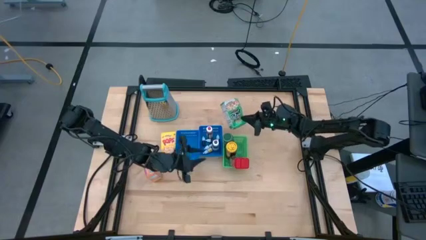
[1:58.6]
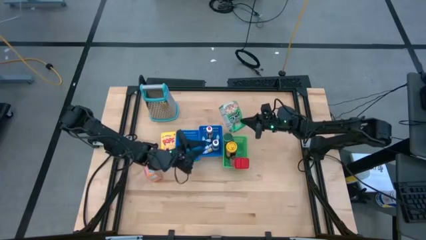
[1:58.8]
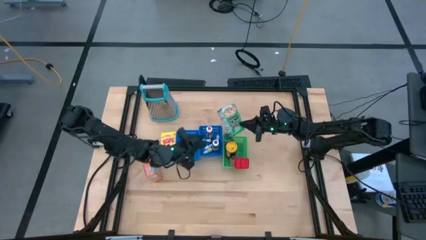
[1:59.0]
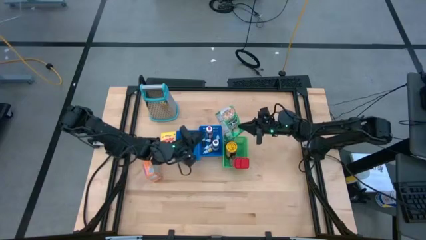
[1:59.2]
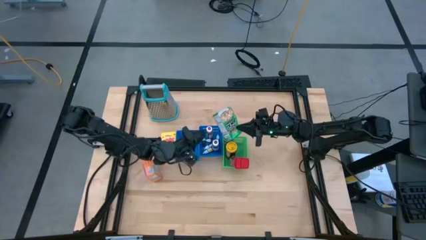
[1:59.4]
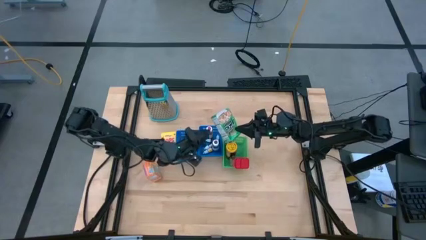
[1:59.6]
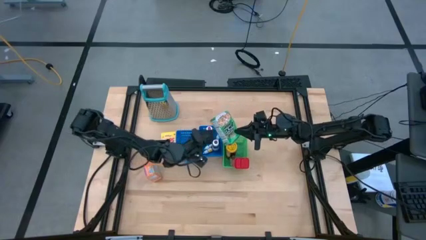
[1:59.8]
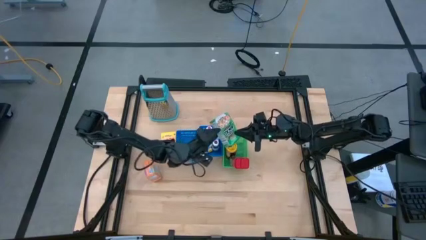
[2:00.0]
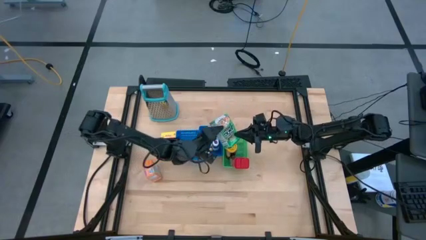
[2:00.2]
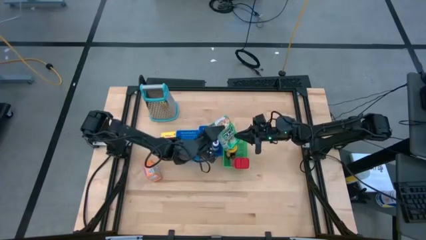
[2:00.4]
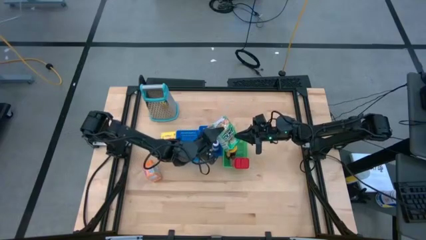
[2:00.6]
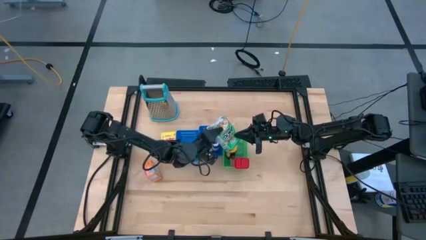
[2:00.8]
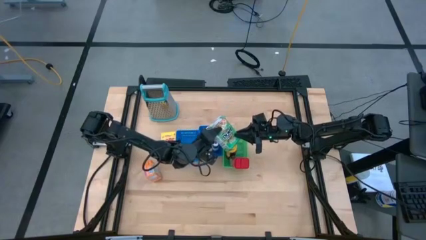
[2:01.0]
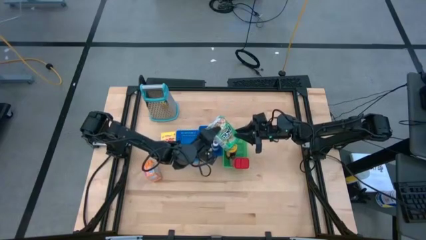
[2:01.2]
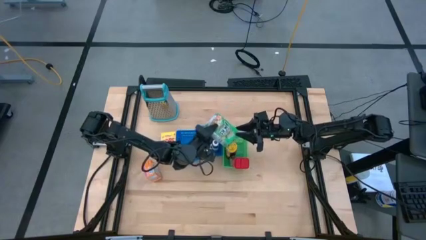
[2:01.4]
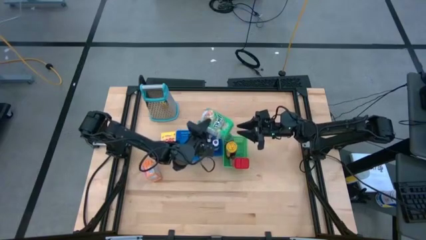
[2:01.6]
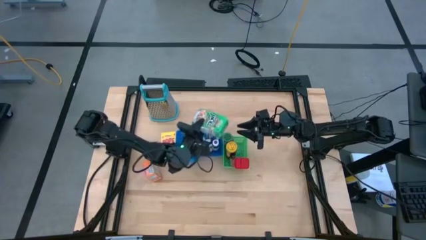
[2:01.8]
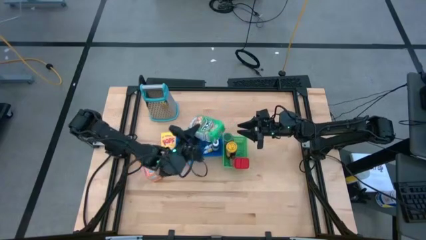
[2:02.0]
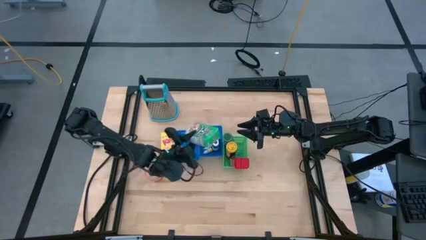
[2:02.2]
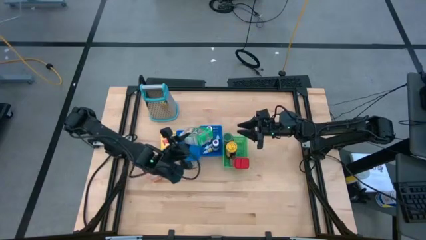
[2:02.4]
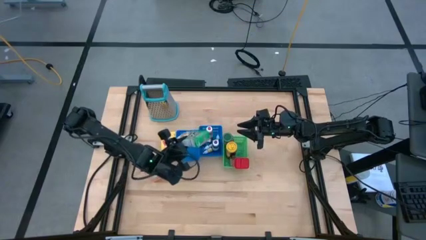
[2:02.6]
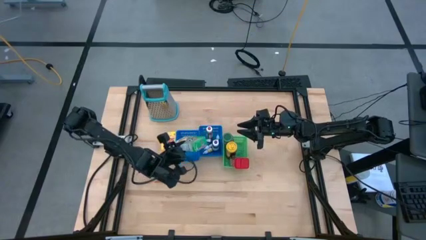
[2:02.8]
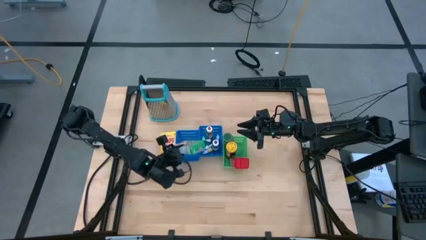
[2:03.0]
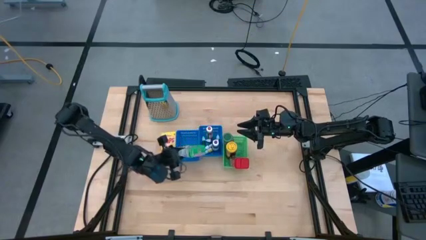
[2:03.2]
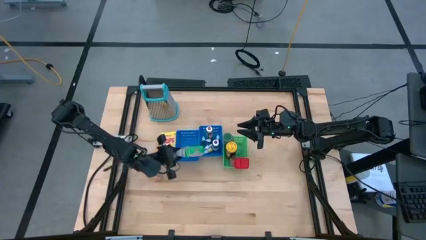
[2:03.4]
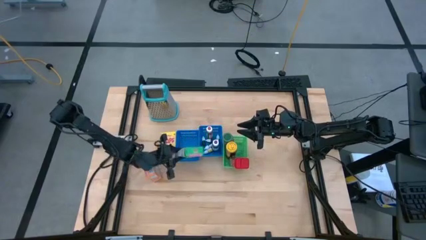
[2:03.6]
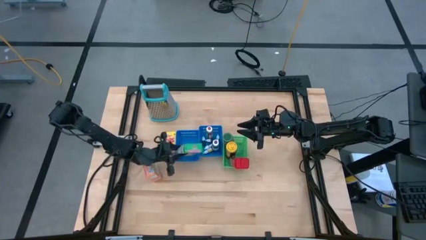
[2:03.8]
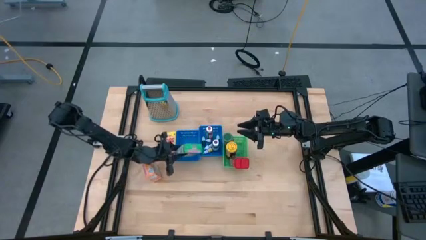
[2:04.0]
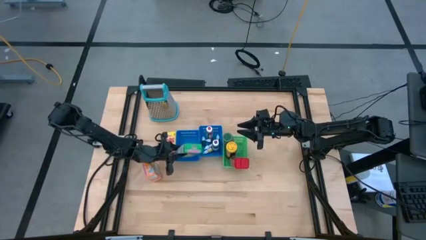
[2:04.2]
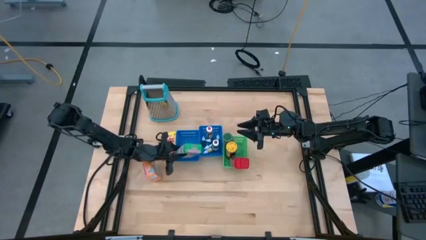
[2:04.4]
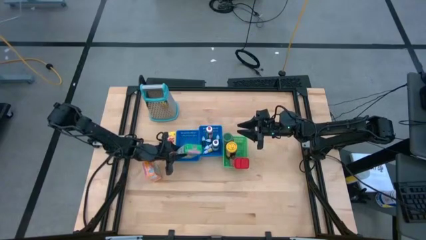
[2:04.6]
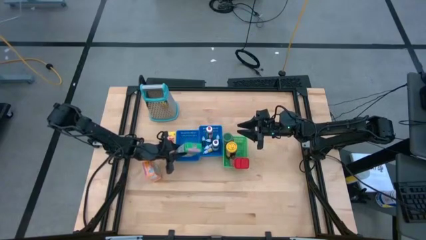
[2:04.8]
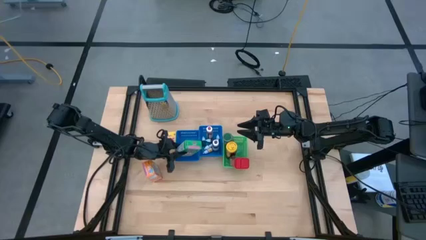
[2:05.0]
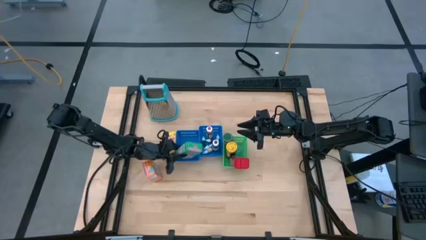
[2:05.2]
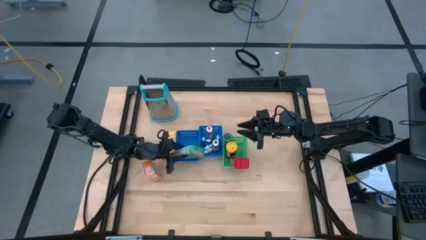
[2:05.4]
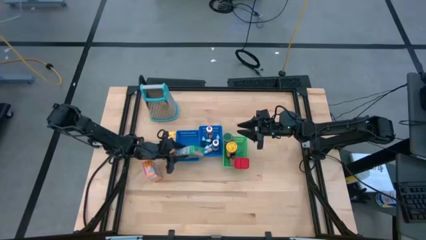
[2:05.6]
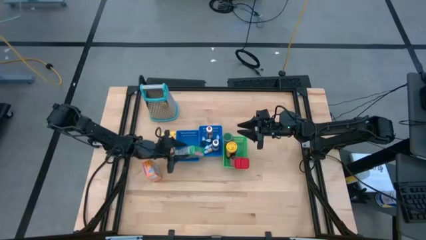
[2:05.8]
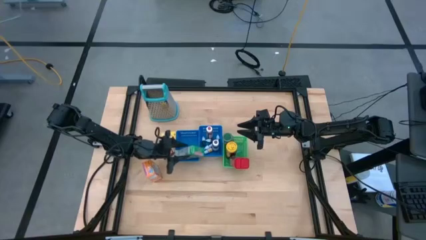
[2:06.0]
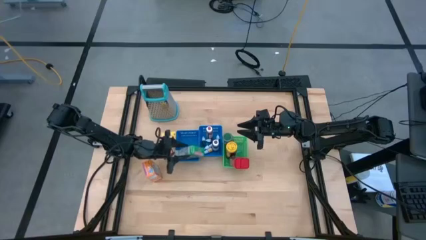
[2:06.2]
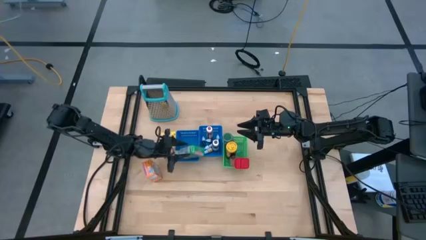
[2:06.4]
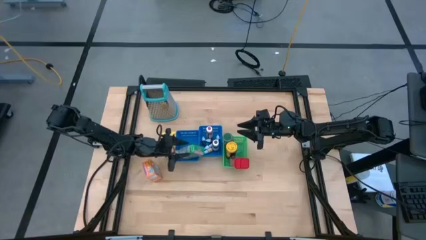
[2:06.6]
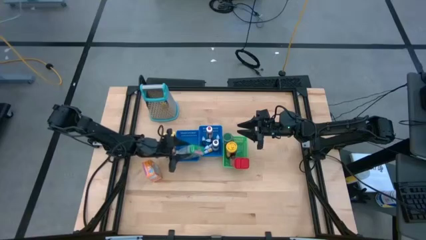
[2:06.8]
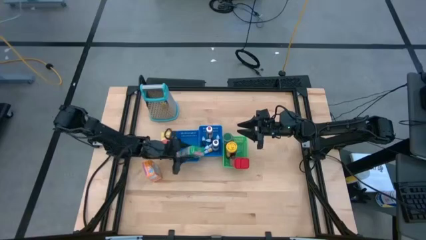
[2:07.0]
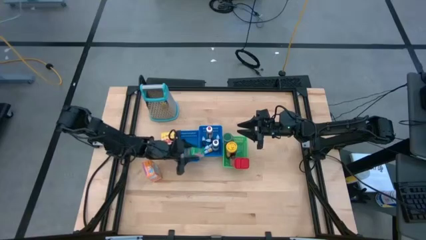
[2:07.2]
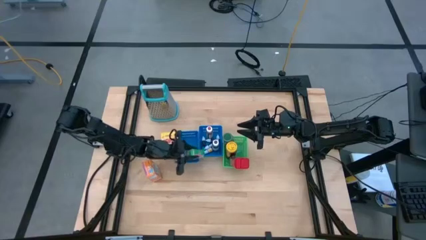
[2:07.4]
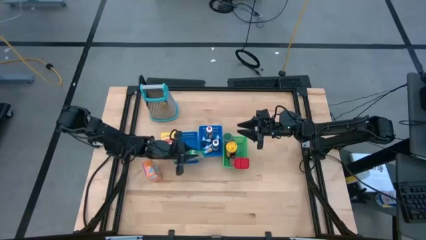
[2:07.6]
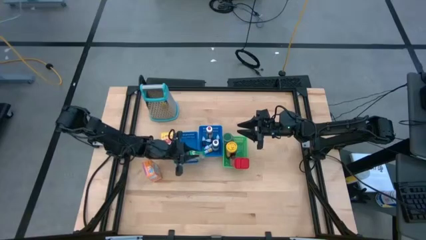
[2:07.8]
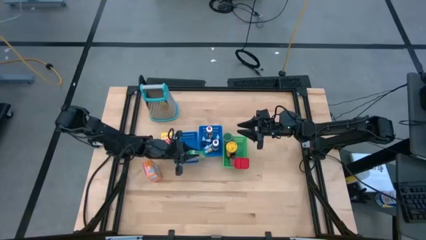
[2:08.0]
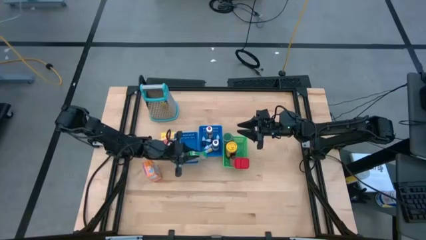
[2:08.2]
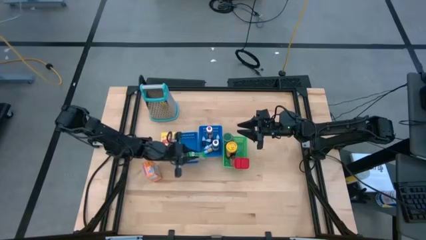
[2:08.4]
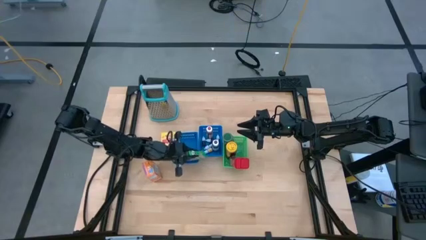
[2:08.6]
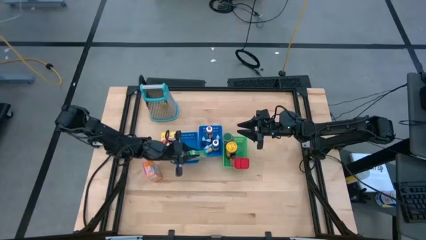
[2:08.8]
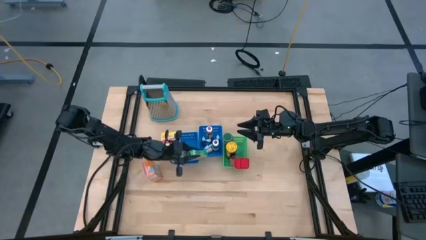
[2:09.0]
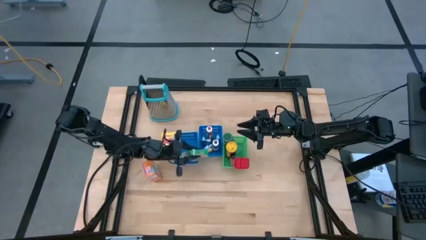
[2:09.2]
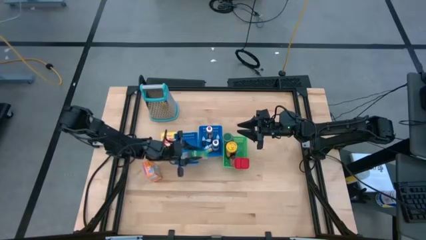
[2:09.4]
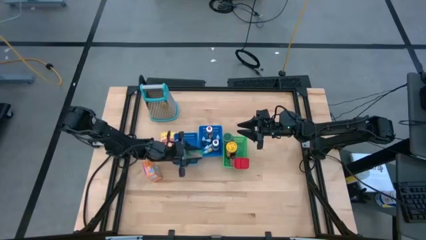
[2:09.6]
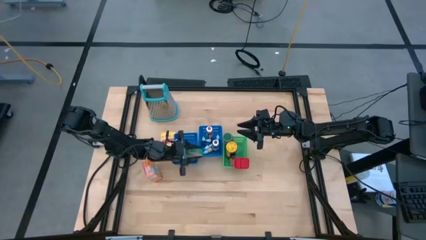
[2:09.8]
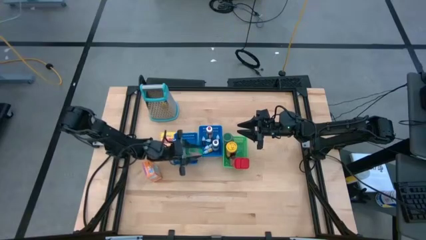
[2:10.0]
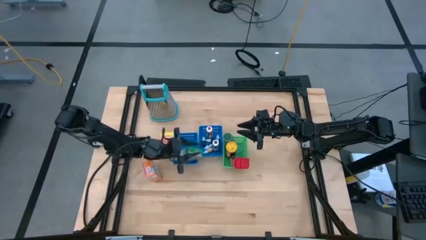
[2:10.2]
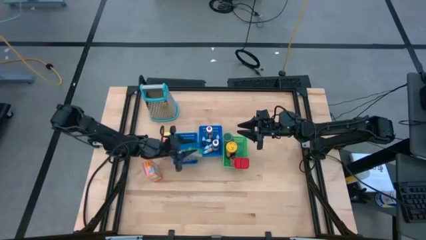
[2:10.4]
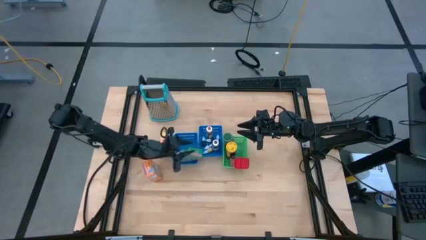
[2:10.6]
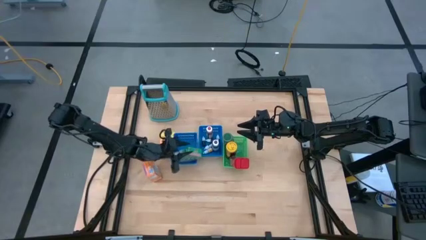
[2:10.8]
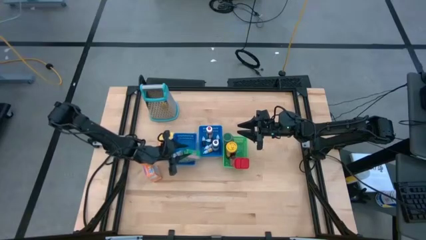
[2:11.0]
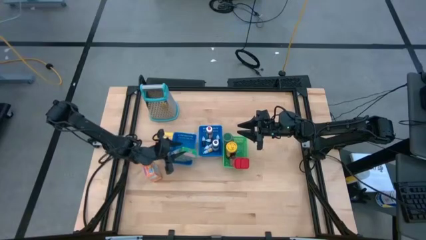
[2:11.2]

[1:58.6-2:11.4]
Task: Pick & Place Kitchen Items
Put the green cereal box into the left blue bin
